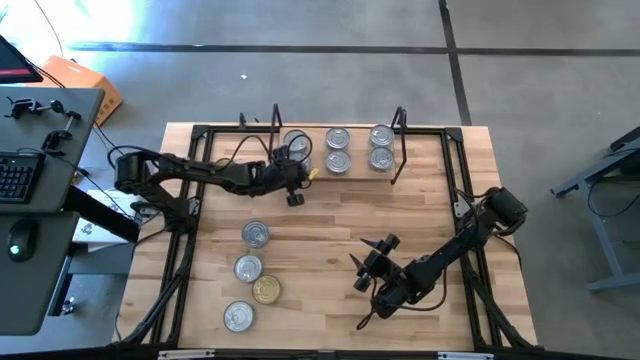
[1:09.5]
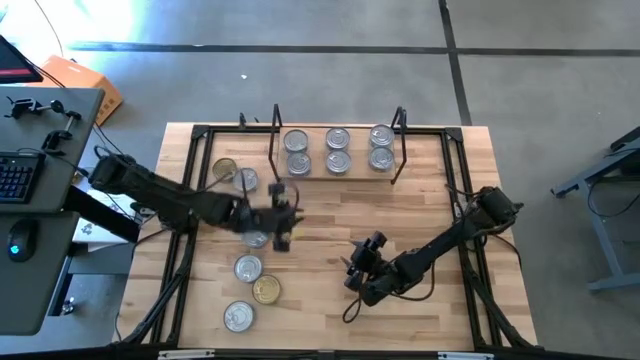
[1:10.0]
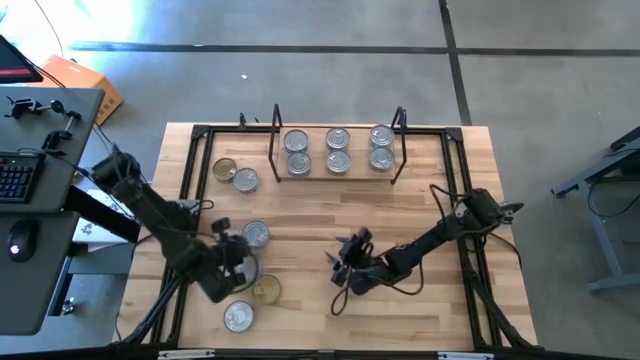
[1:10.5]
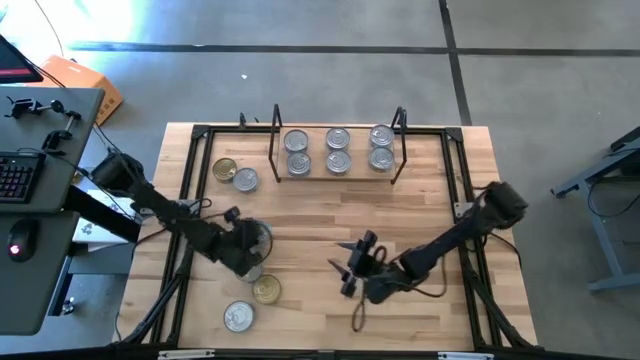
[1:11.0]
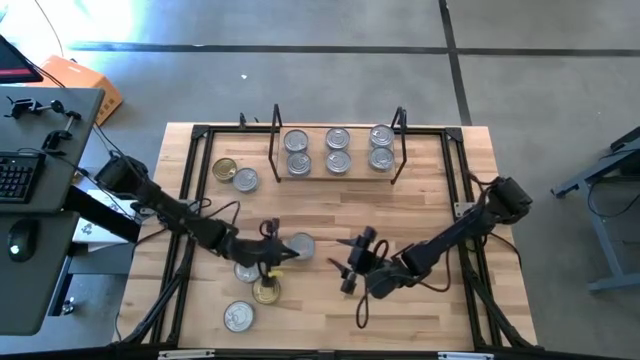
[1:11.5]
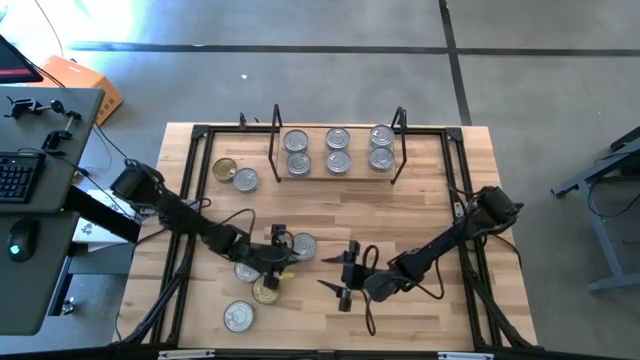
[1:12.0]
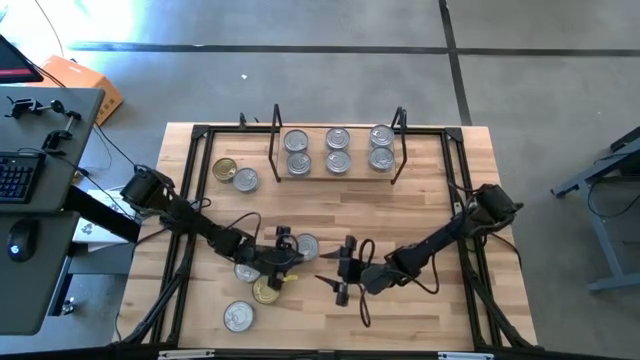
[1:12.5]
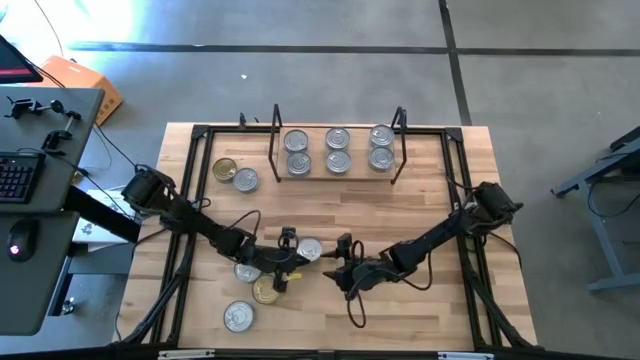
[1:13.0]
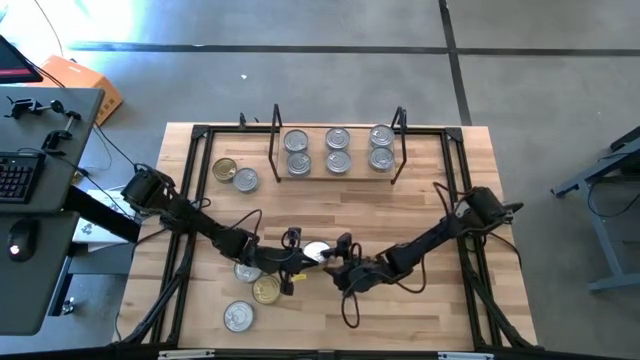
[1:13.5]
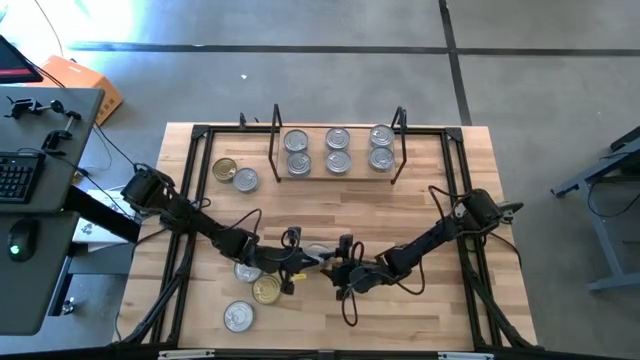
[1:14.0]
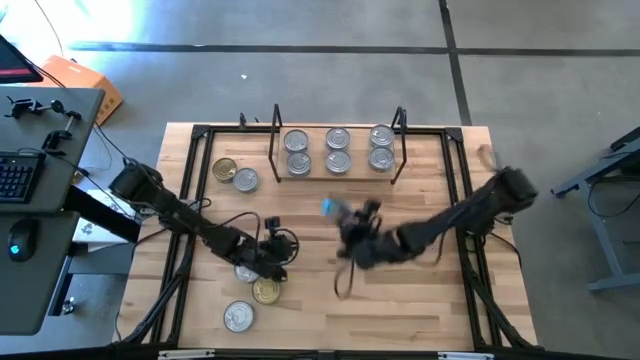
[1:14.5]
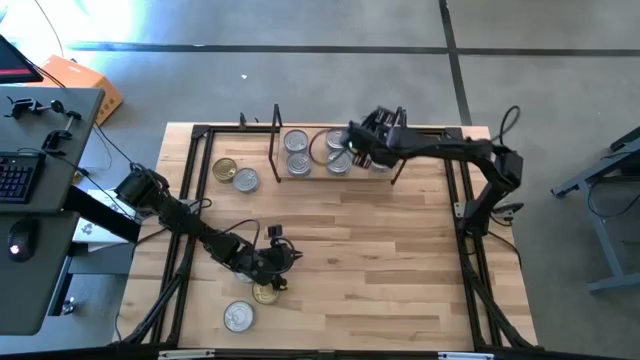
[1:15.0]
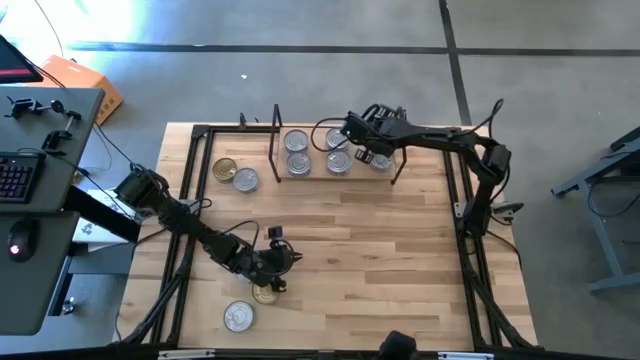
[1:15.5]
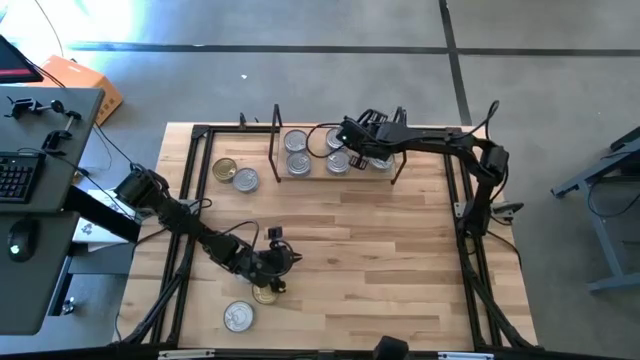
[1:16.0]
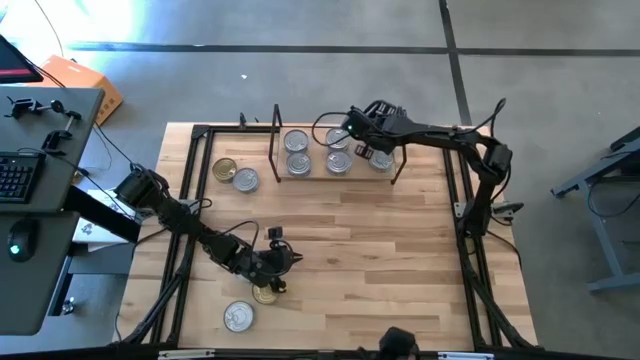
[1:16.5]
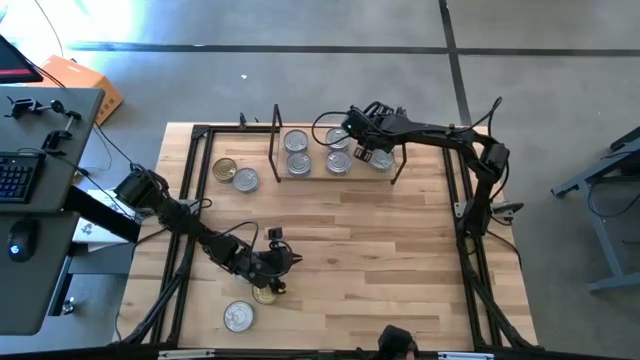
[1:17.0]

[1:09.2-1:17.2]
Task: Stack canned seafood by type on shelf
Stack the yellow and blue tuna can on top of the yellow and blue tuna can on the shelf

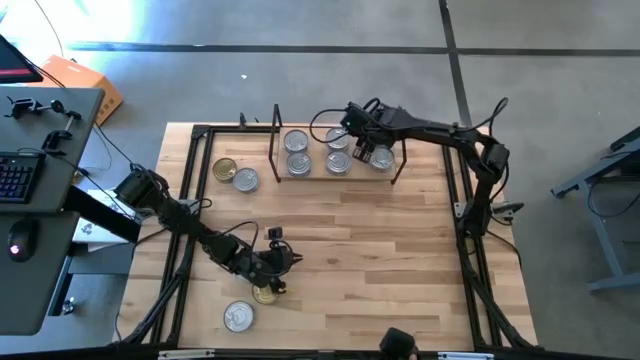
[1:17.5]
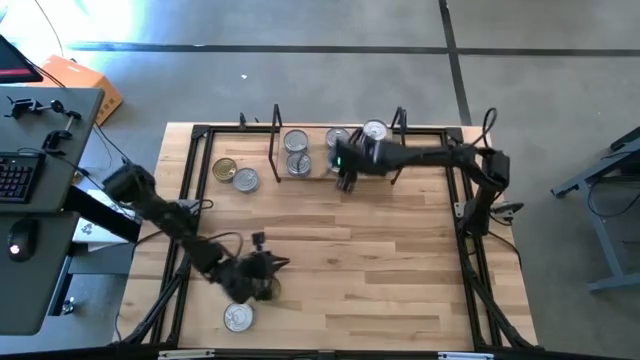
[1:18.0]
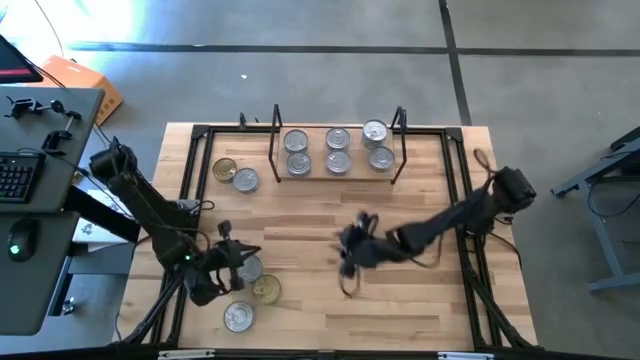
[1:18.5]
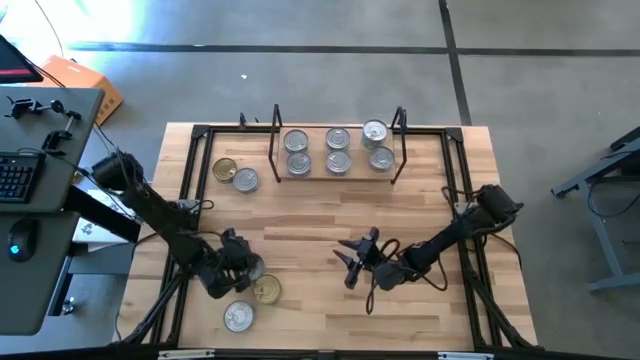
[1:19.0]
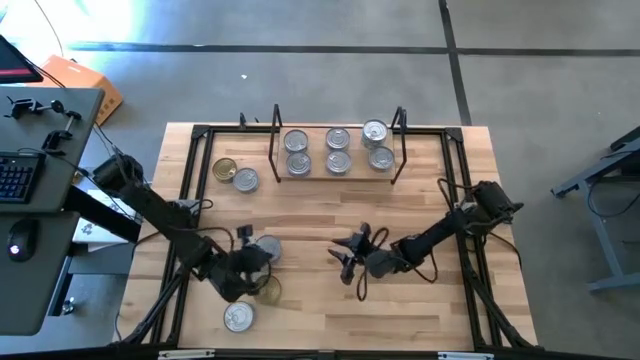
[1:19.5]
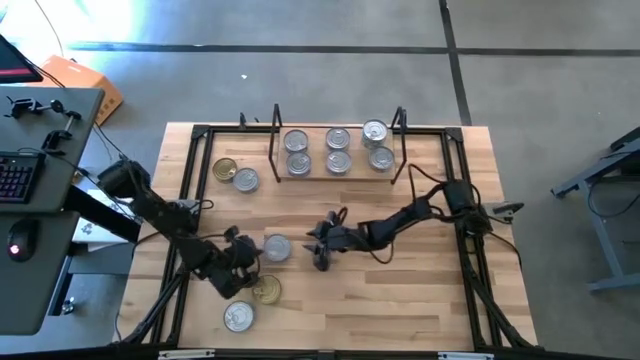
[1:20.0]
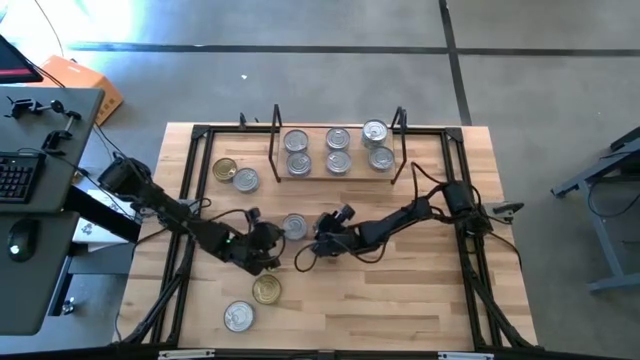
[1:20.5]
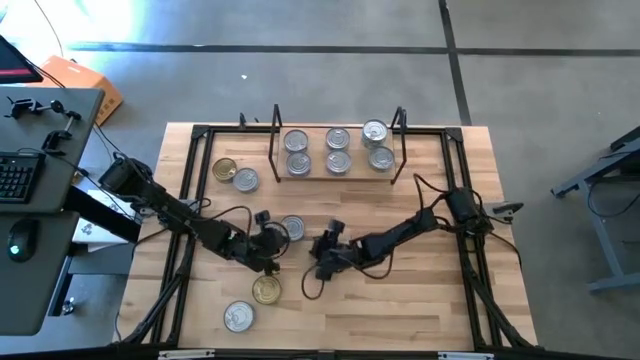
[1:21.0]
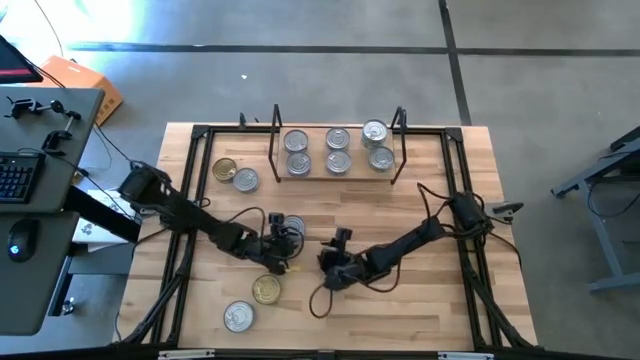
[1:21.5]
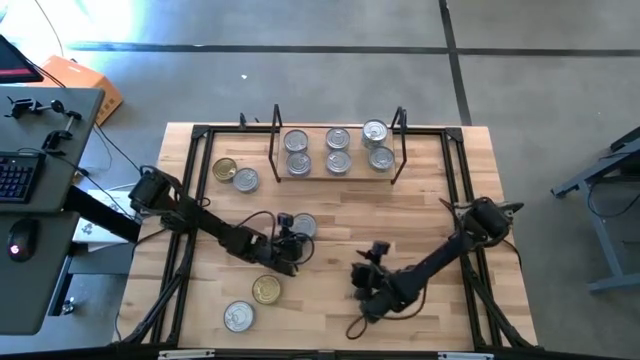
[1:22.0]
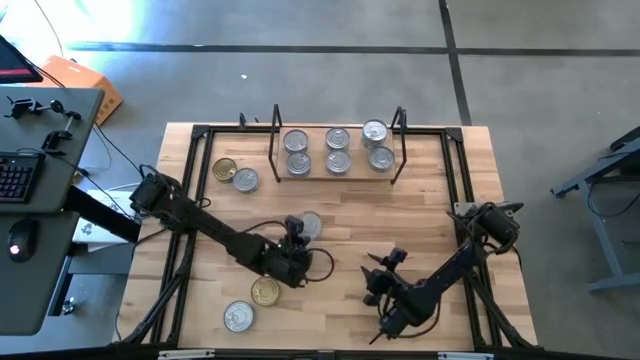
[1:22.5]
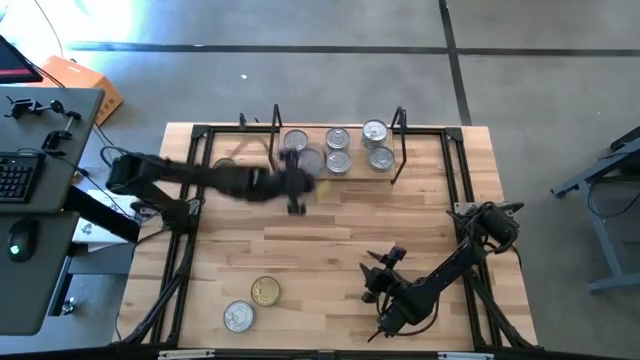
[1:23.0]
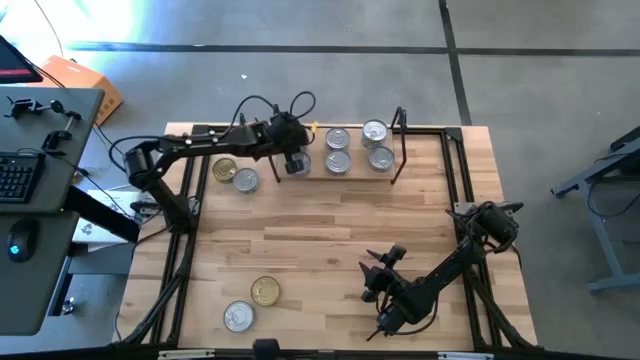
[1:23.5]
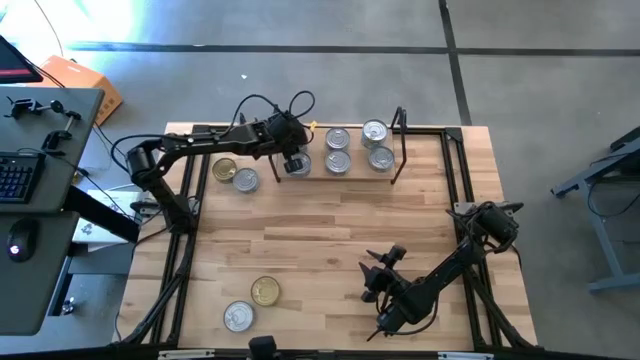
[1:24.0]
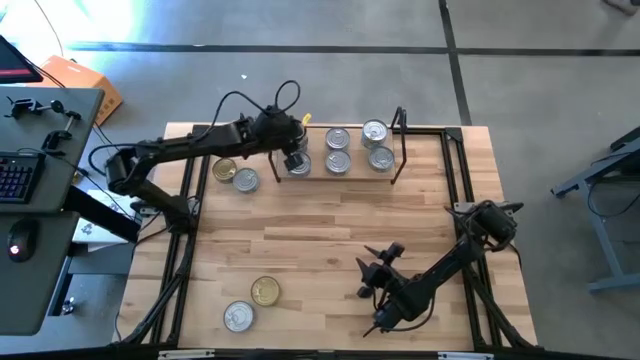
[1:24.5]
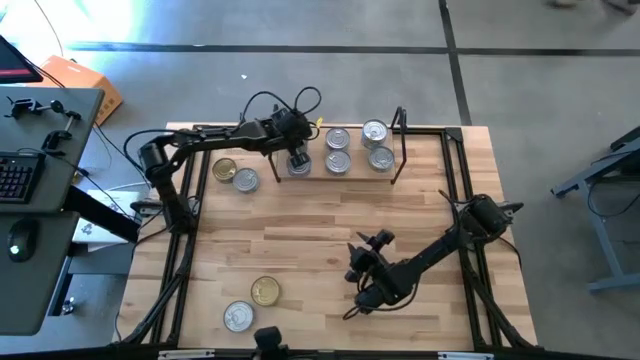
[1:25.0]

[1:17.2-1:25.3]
Stack the blue tuna can on top of the blue tuna can on the shelf

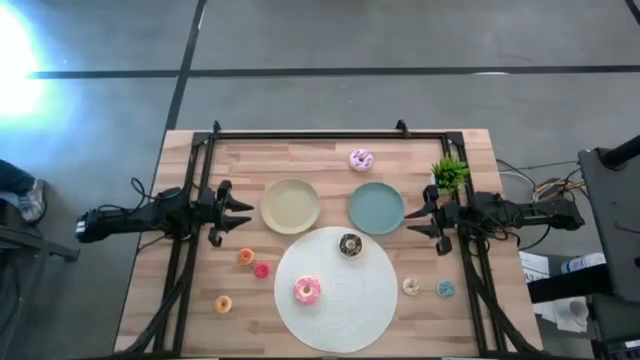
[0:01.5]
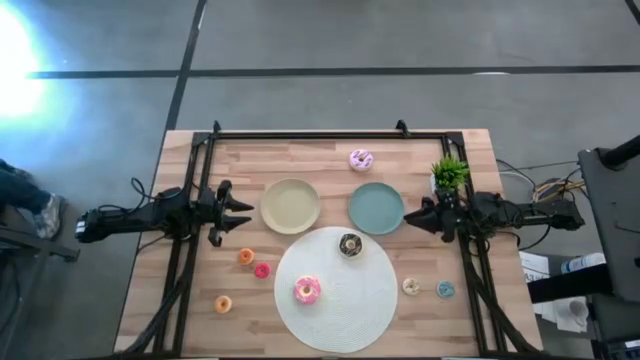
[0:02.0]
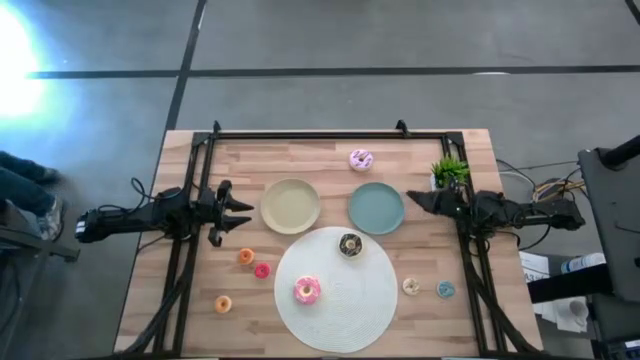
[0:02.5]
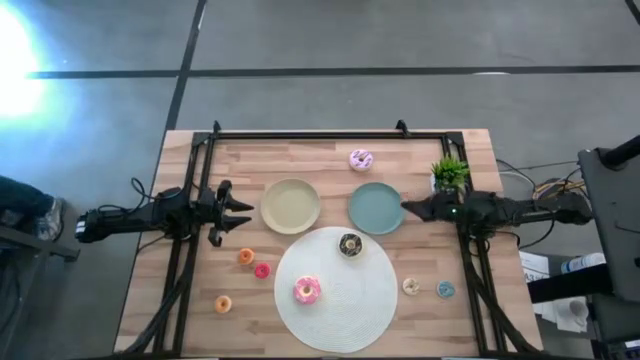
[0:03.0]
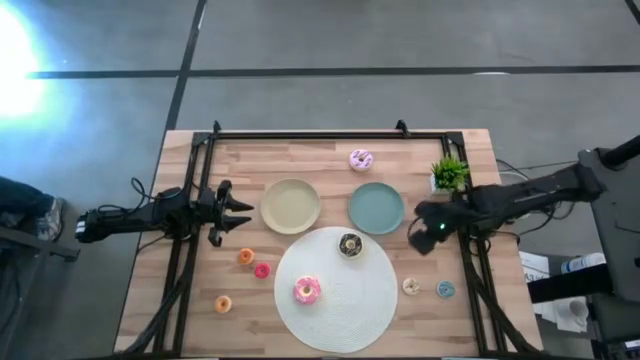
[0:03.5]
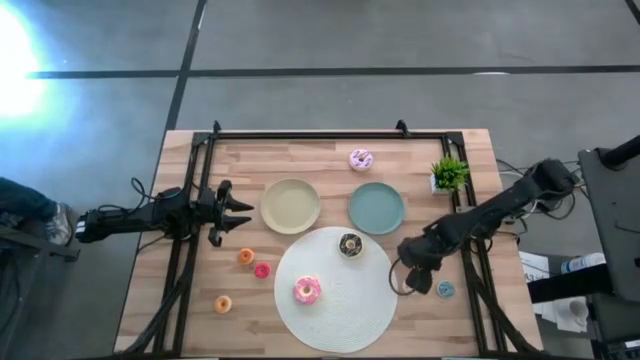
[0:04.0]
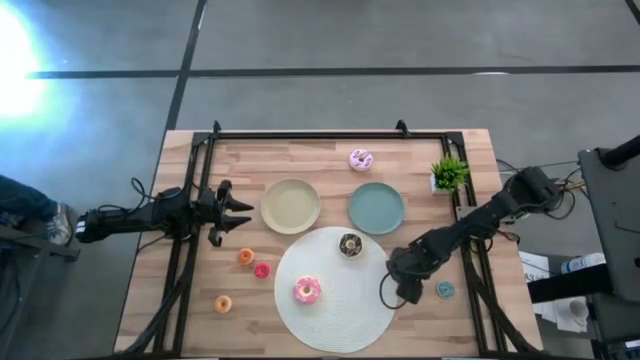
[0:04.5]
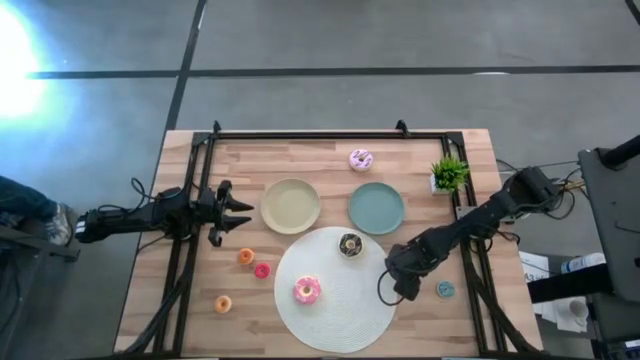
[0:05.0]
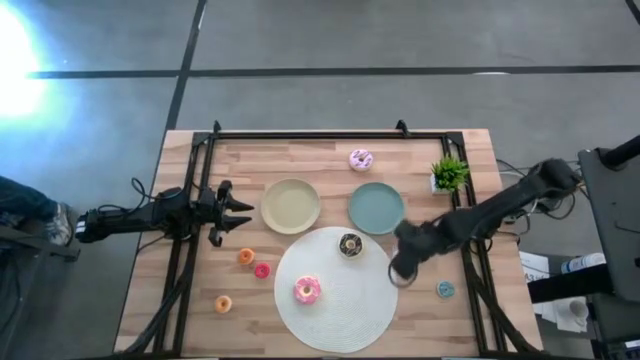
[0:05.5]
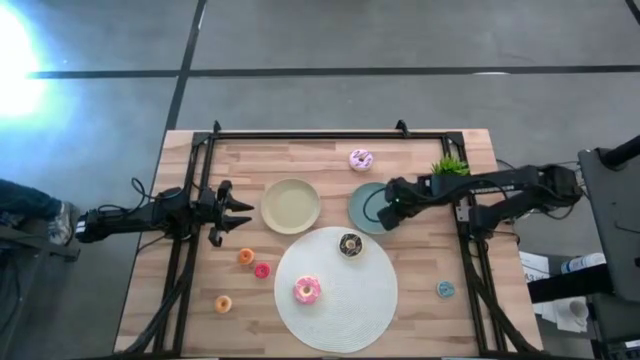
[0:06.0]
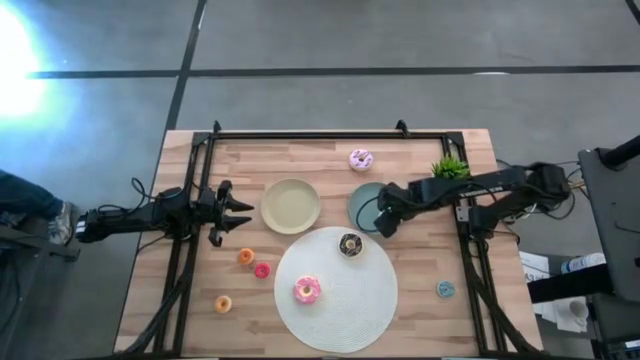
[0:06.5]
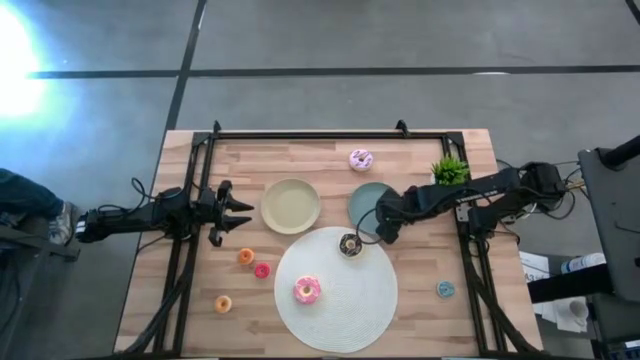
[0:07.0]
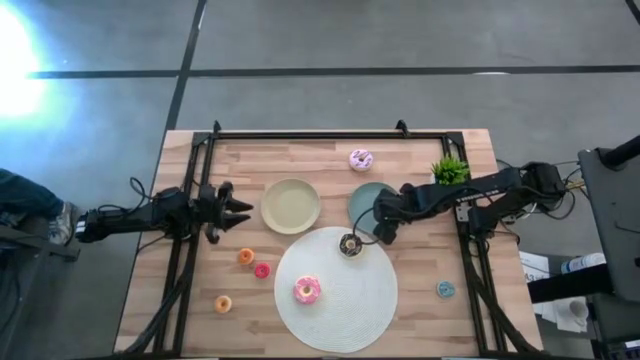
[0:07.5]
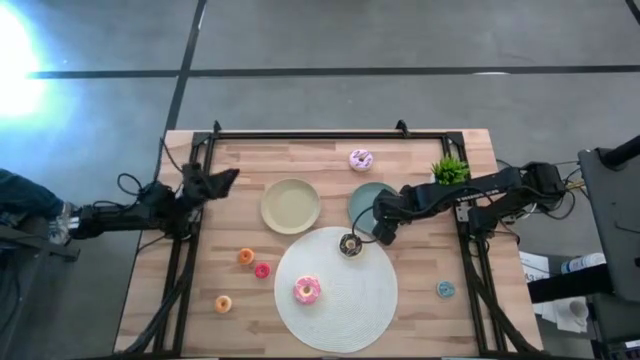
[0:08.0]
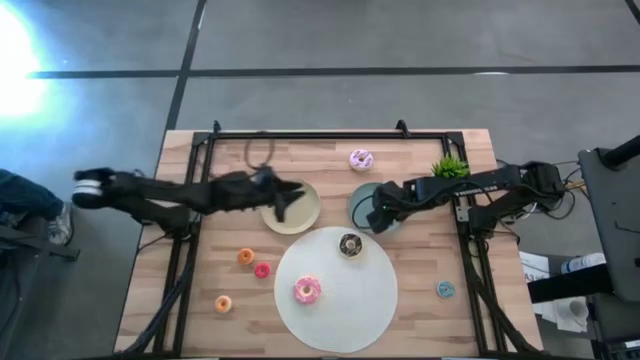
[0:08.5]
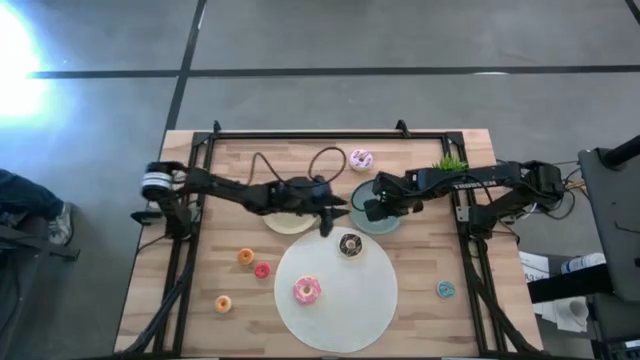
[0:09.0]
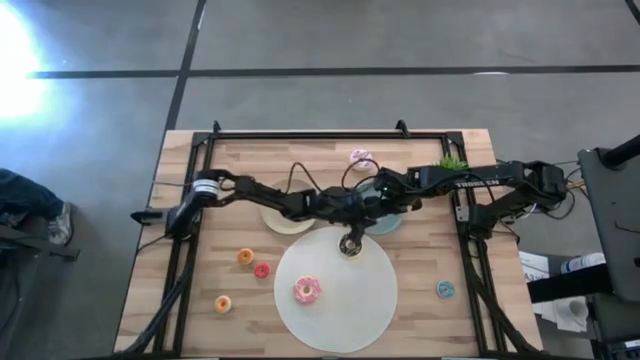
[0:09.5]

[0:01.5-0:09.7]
Task: Pick & Place donuts
Put the small yellow donut on the light blue plate
